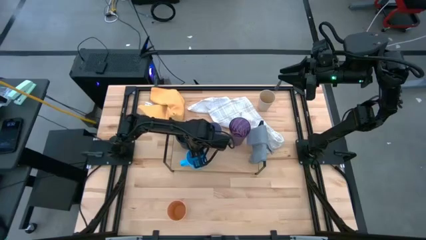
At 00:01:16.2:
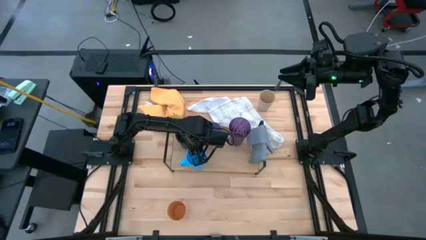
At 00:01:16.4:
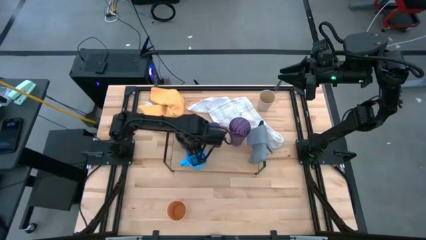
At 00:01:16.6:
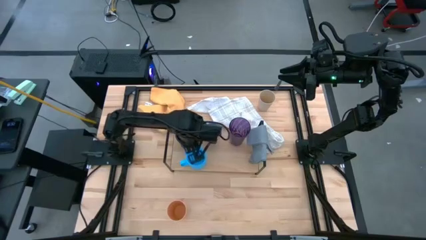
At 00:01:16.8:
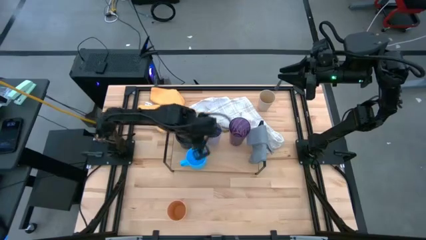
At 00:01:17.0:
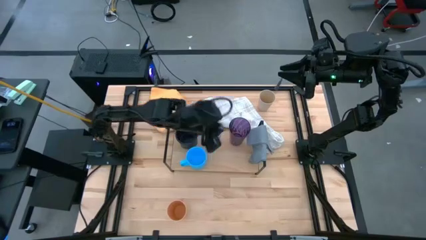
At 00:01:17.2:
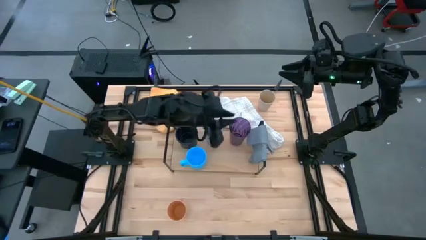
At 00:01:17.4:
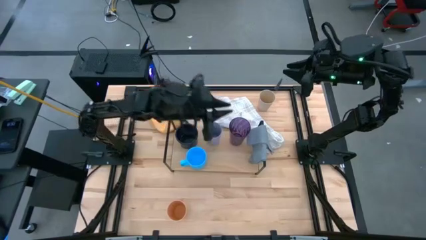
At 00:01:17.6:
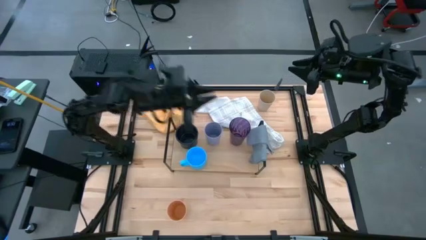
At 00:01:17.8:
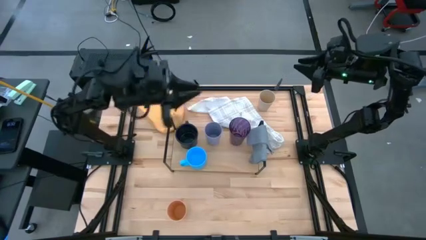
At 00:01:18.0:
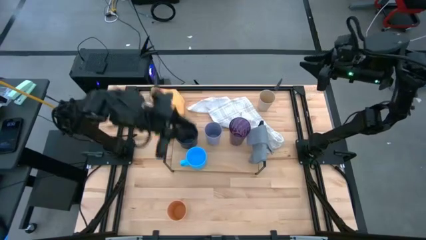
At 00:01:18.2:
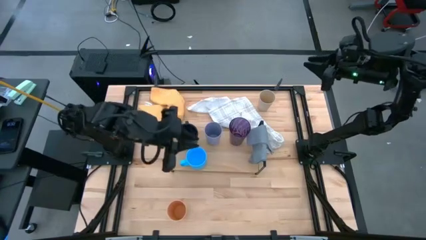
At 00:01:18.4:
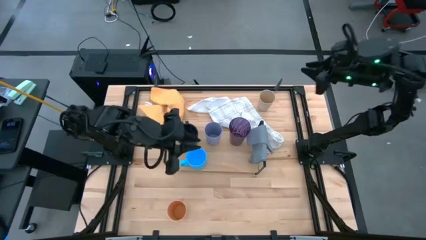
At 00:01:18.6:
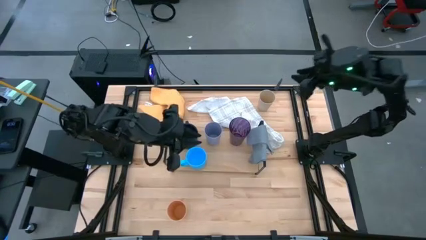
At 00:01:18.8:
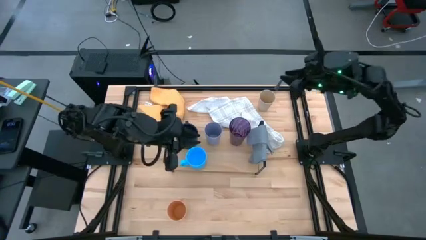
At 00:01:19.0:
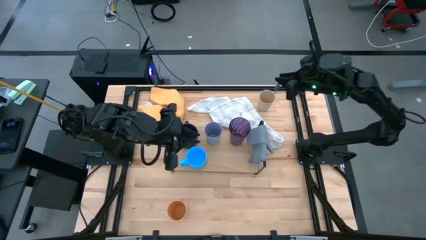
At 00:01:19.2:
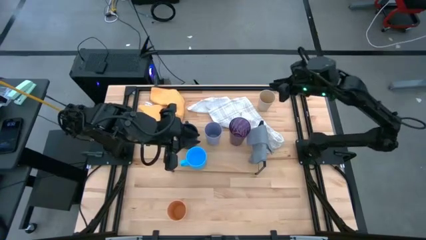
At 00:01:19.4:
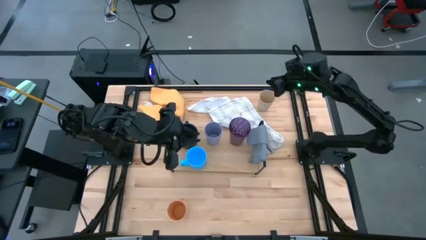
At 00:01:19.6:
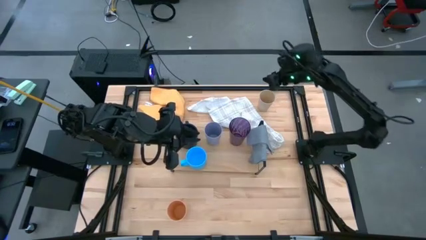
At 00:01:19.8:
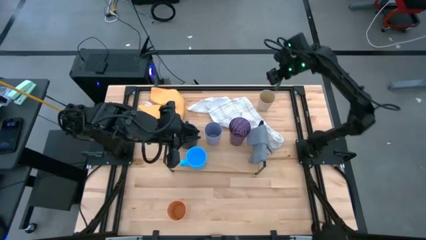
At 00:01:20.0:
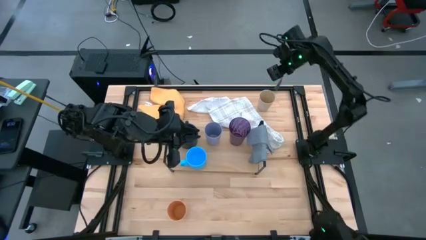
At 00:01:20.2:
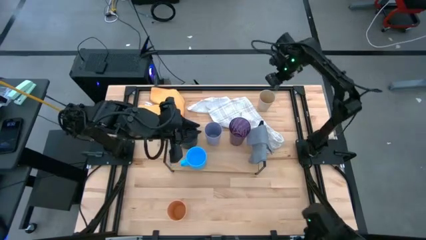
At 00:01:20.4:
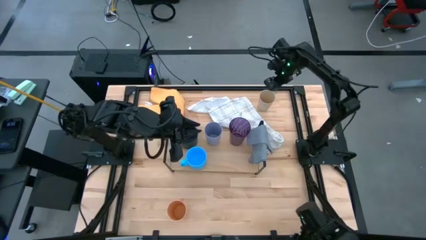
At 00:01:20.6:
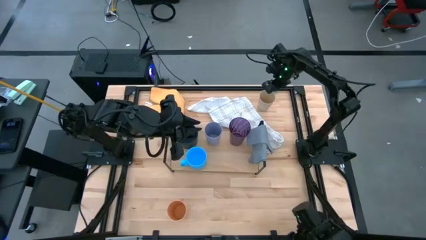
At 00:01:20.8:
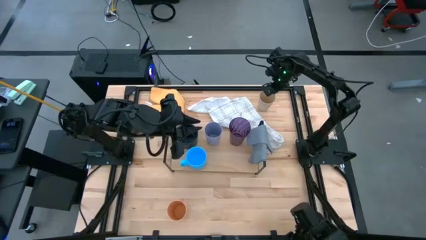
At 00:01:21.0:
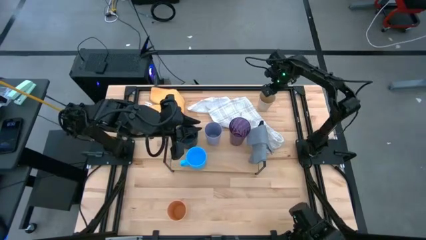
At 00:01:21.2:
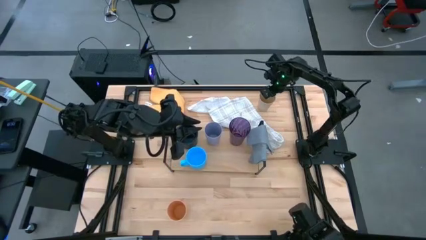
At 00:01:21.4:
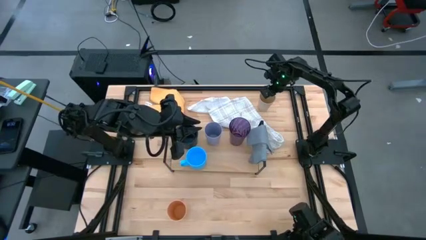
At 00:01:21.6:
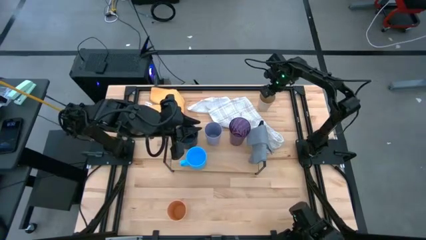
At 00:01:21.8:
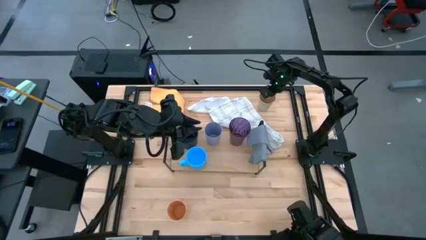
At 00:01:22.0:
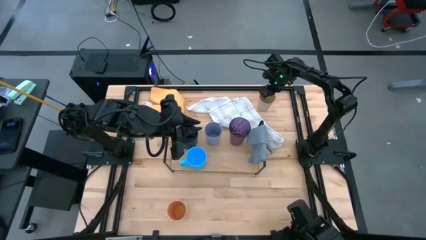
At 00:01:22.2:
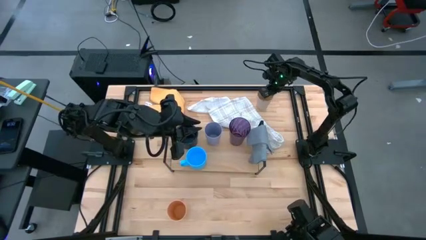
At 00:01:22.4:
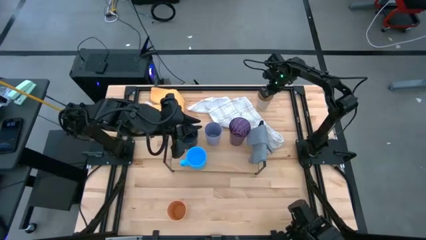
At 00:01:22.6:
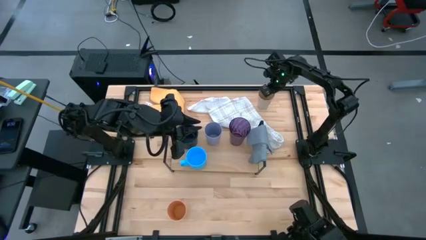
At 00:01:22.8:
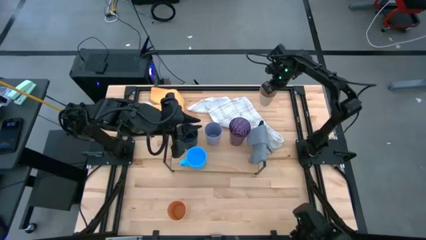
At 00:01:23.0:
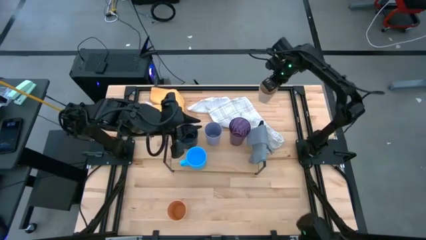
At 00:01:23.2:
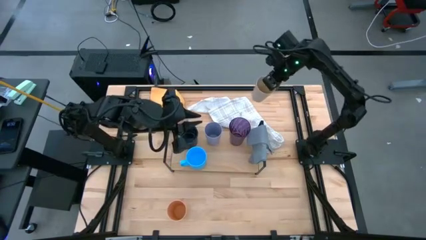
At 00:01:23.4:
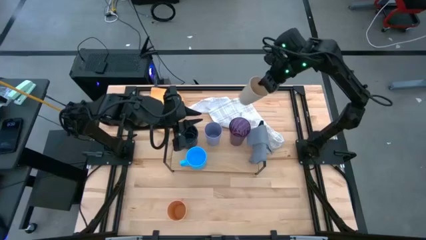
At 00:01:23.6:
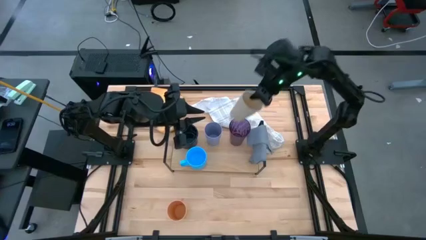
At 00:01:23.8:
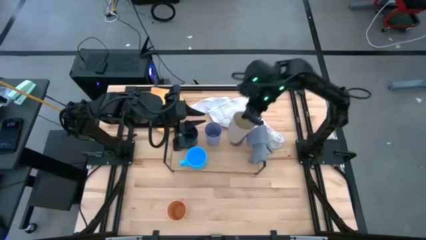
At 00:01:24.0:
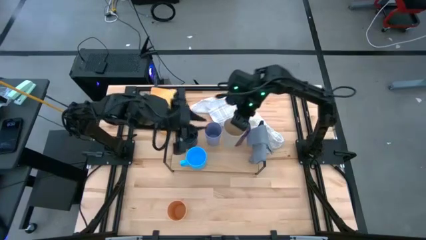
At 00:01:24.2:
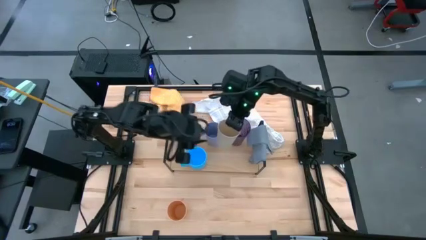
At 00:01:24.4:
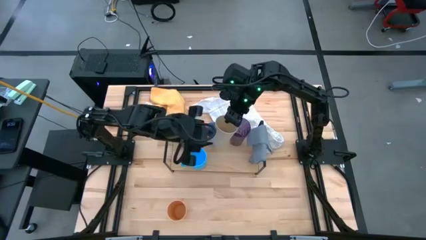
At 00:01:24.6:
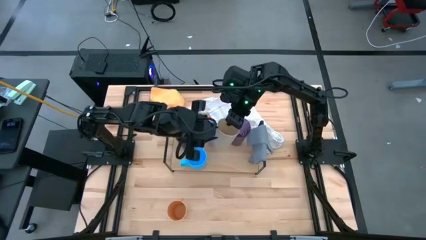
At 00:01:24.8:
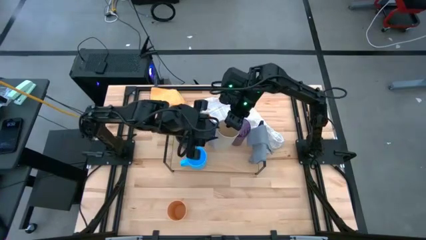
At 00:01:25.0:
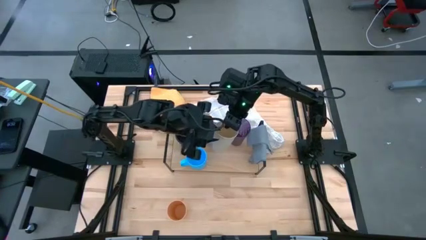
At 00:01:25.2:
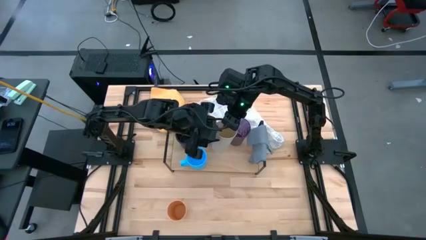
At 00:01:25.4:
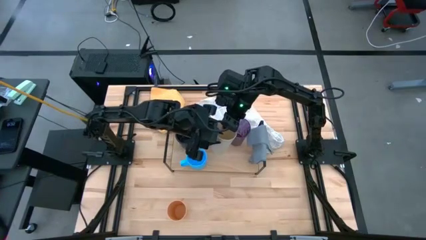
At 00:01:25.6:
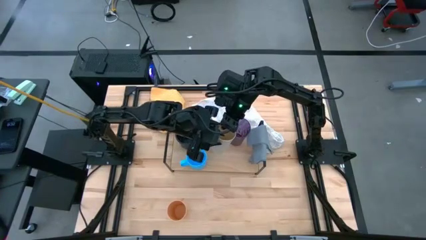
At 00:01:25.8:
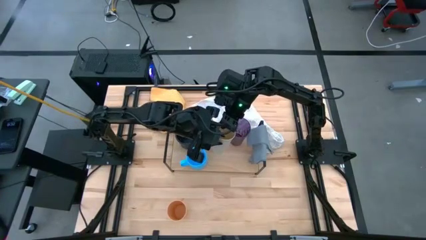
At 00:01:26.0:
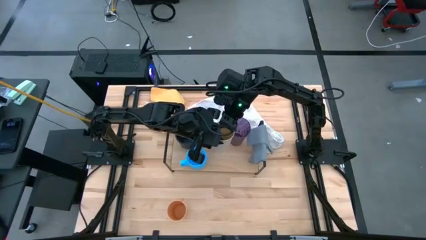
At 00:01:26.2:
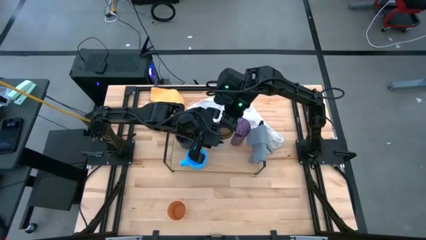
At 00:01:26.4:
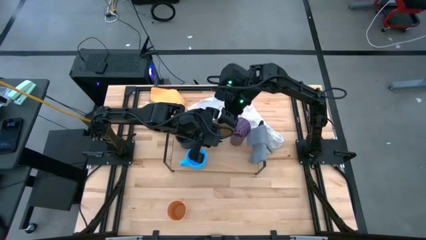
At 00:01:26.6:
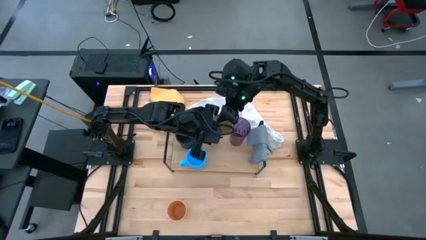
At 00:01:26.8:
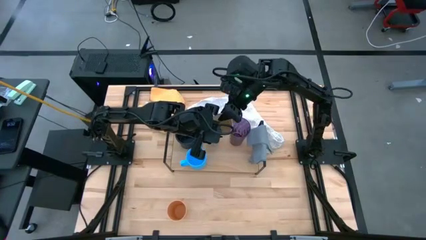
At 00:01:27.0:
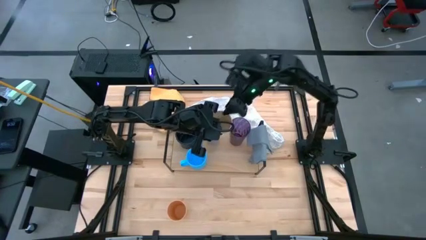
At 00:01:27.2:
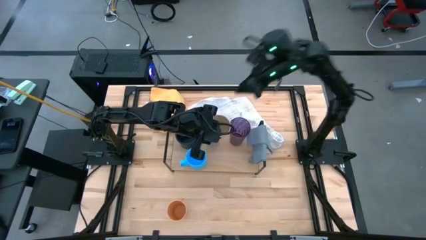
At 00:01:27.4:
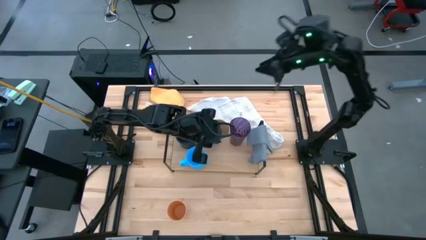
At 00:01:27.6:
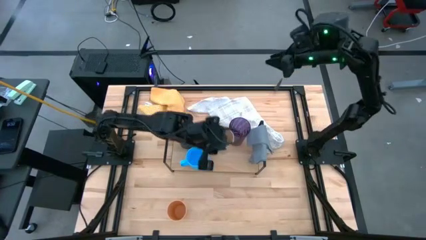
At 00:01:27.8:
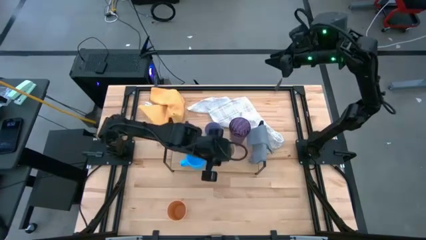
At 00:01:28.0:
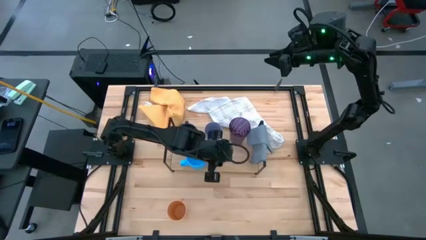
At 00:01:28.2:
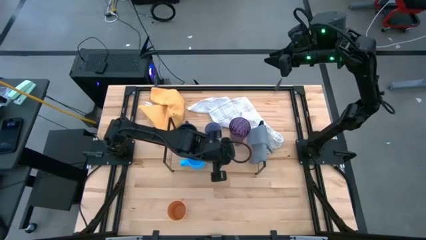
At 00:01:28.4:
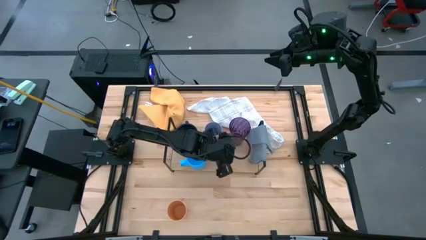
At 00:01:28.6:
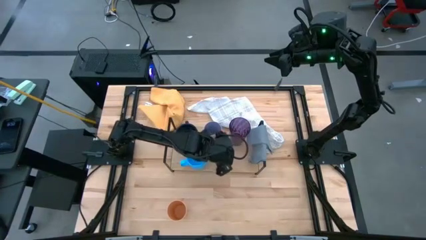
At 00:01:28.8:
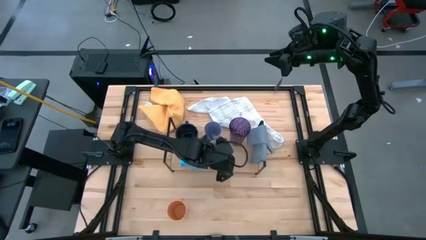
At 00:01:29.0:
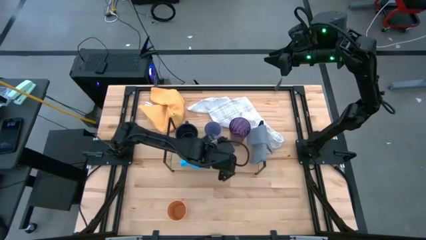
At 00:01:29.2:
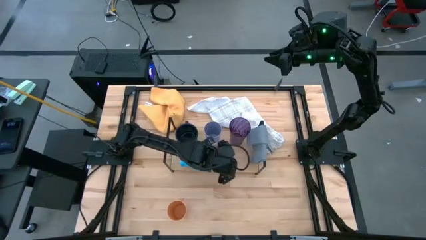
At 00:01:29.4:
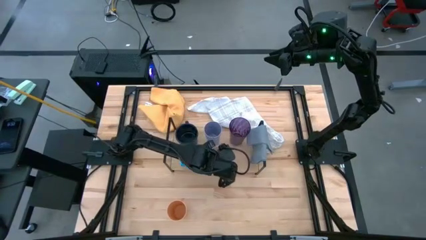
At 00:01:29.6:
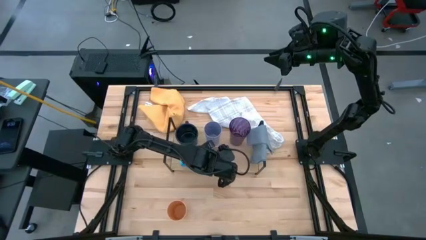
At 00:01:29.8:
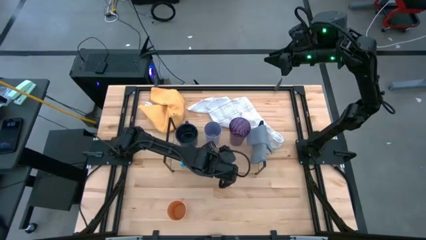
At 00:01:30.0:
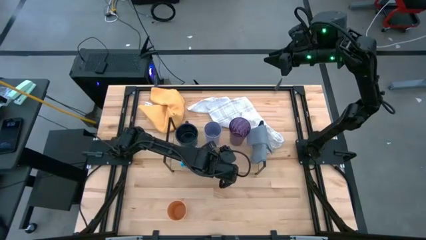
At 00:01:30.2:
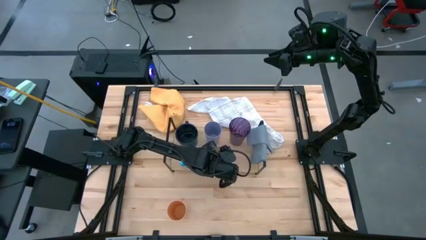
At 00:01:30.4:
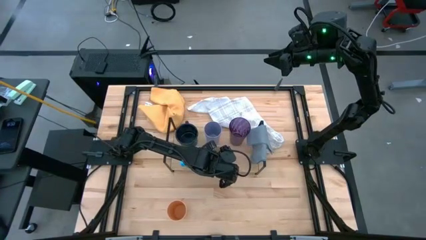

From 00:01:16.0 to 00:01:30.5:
Task: Stack small to large cups/mugs on shelf
Put the white cup on the shelf
